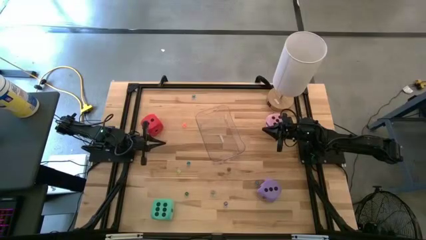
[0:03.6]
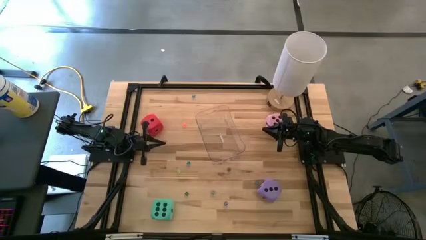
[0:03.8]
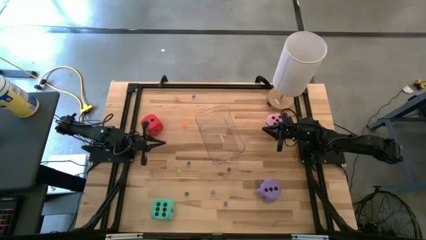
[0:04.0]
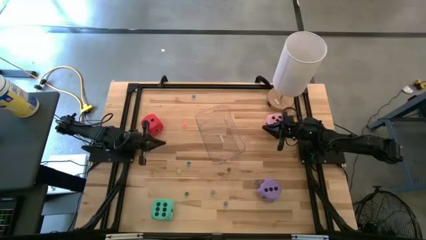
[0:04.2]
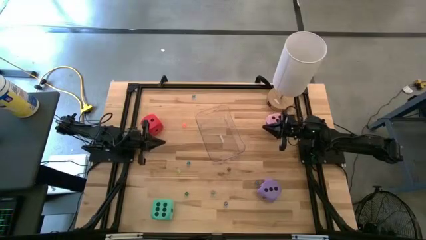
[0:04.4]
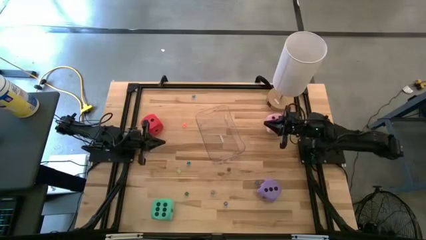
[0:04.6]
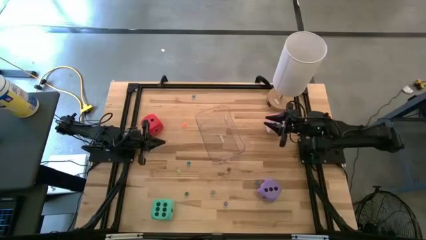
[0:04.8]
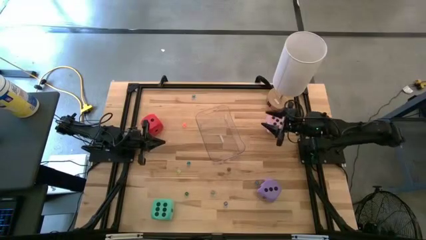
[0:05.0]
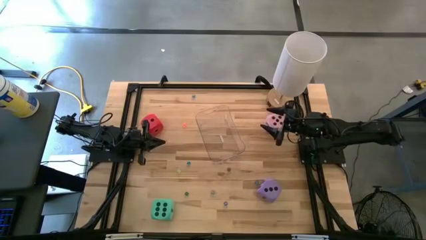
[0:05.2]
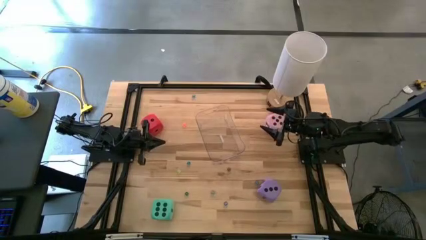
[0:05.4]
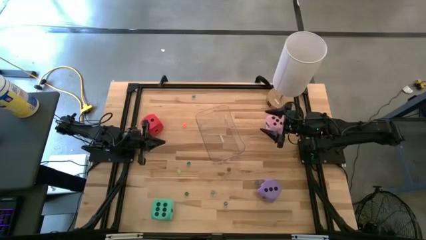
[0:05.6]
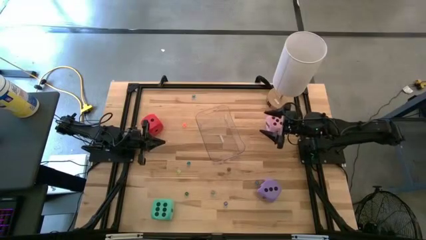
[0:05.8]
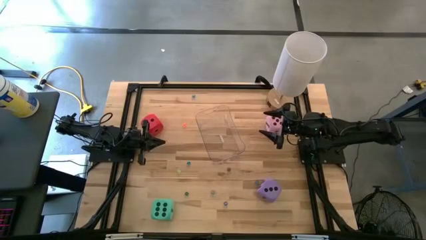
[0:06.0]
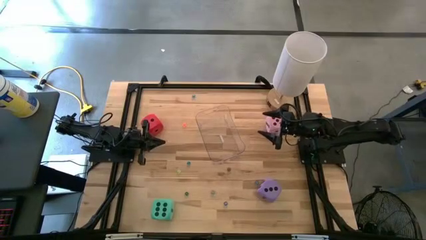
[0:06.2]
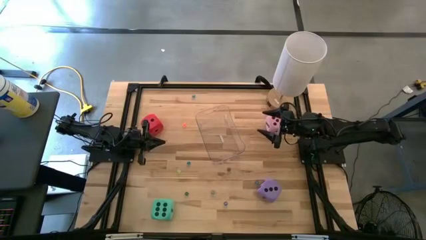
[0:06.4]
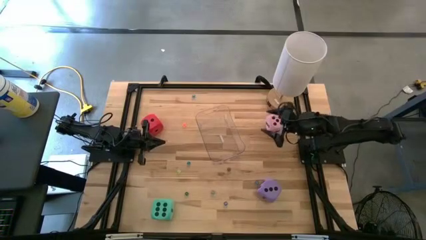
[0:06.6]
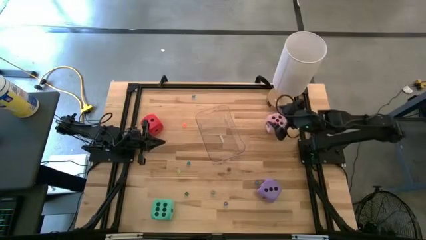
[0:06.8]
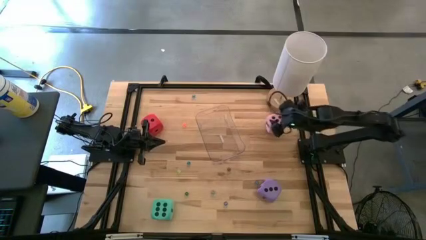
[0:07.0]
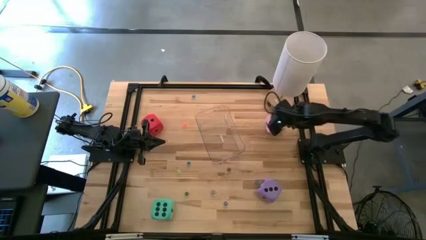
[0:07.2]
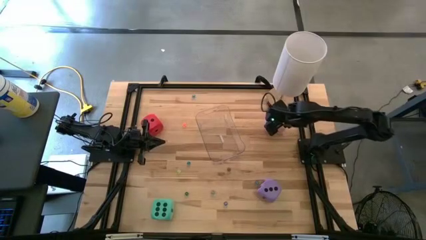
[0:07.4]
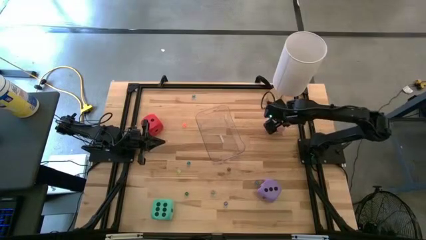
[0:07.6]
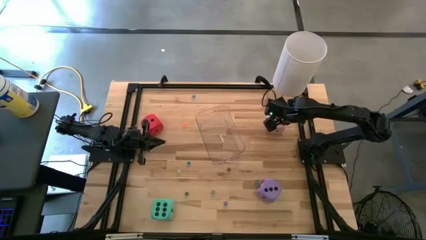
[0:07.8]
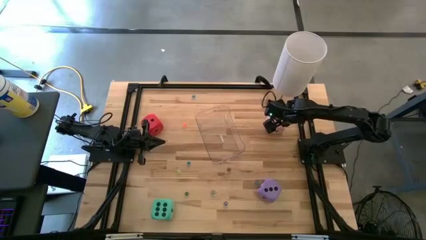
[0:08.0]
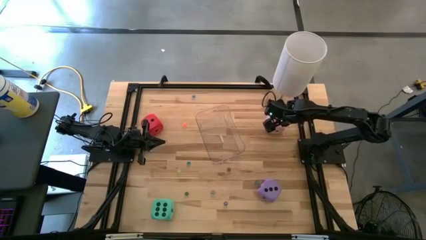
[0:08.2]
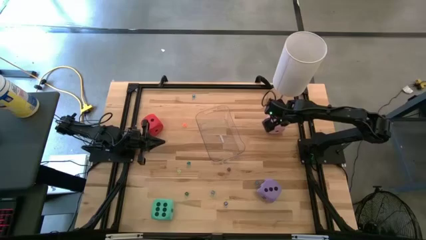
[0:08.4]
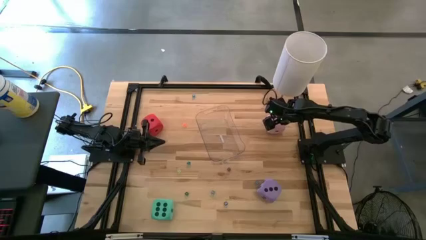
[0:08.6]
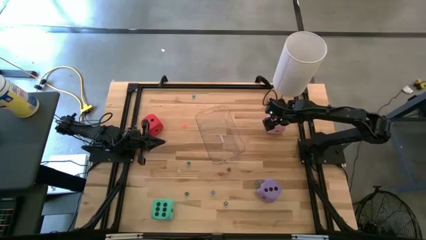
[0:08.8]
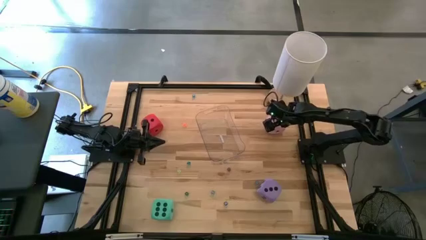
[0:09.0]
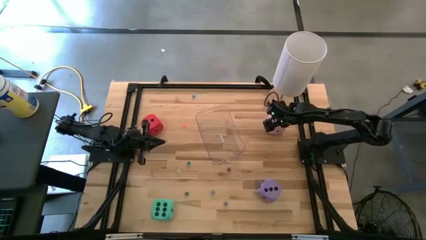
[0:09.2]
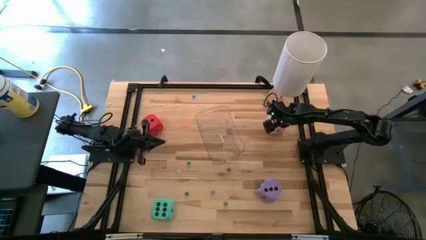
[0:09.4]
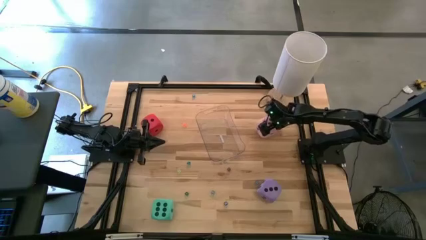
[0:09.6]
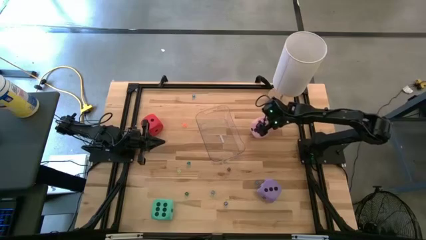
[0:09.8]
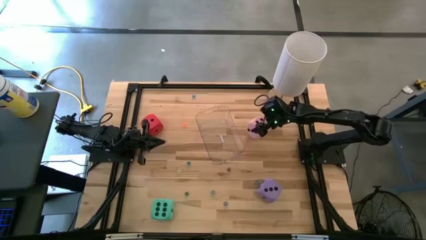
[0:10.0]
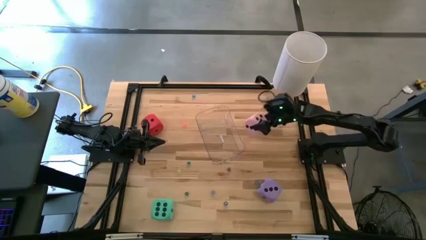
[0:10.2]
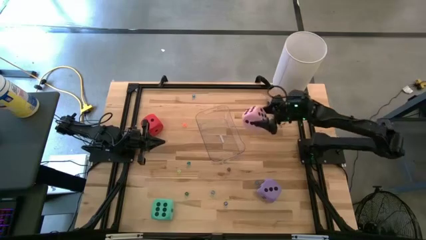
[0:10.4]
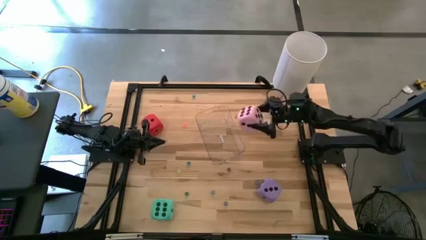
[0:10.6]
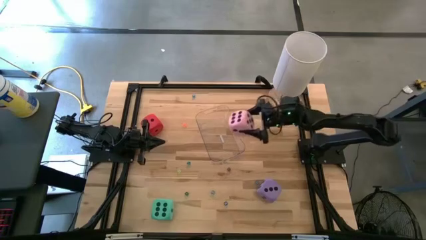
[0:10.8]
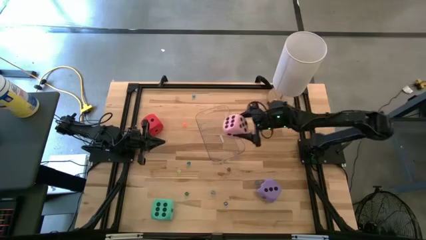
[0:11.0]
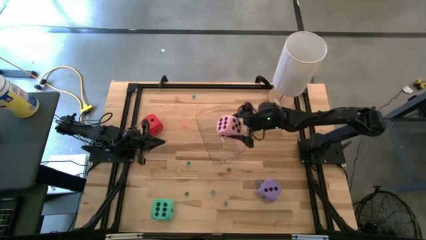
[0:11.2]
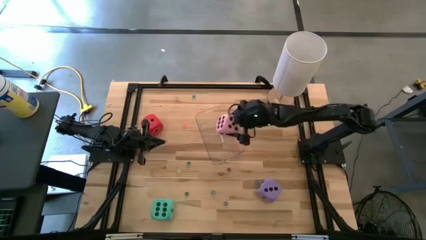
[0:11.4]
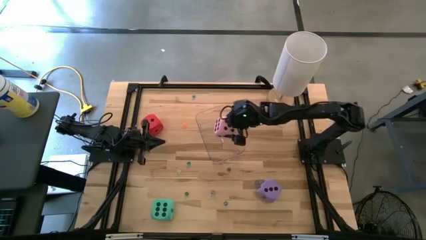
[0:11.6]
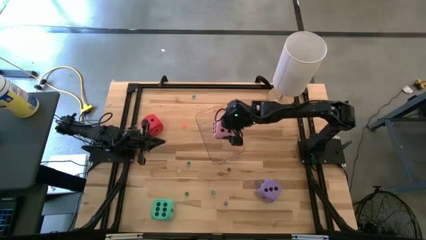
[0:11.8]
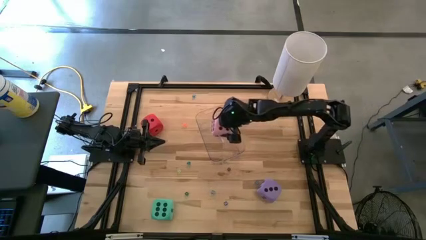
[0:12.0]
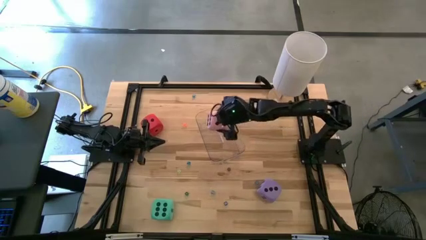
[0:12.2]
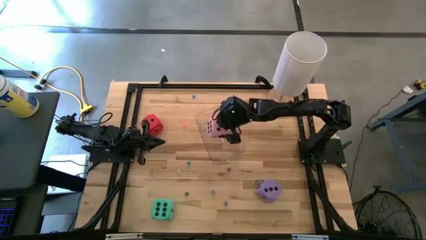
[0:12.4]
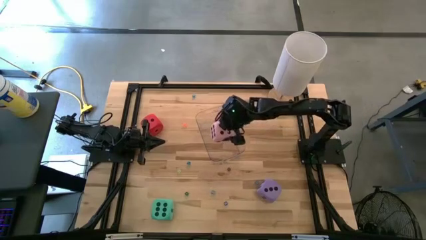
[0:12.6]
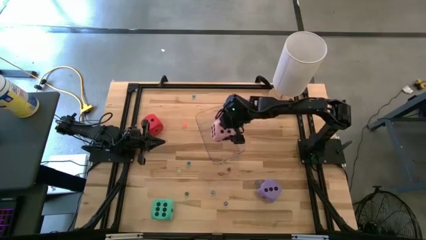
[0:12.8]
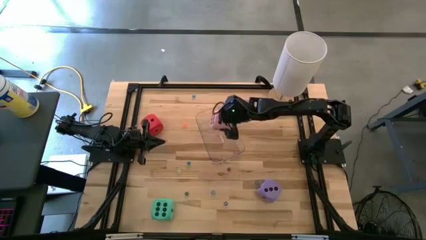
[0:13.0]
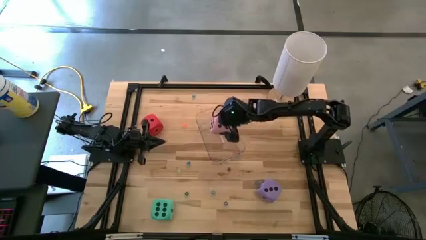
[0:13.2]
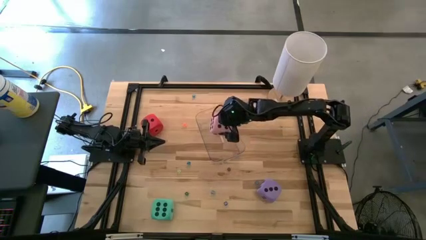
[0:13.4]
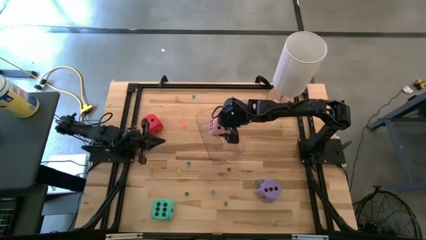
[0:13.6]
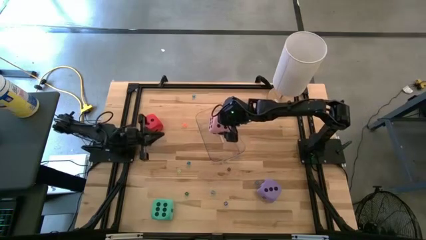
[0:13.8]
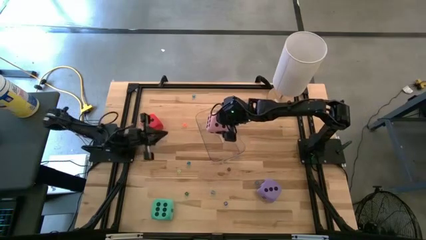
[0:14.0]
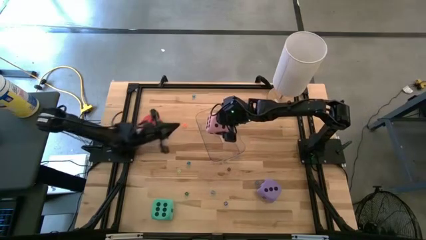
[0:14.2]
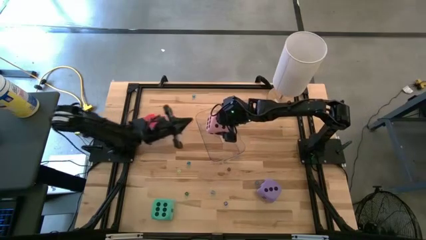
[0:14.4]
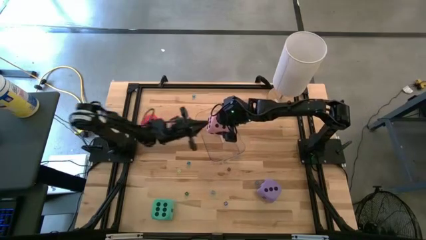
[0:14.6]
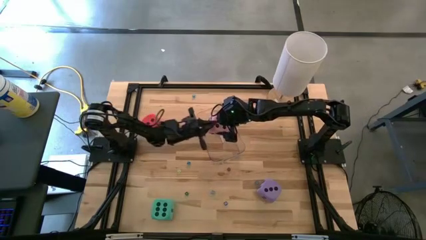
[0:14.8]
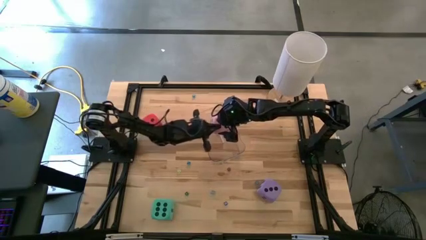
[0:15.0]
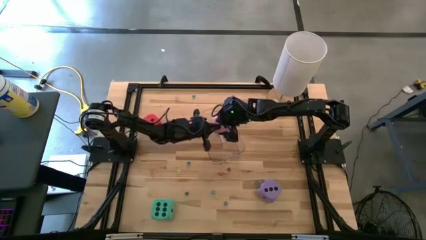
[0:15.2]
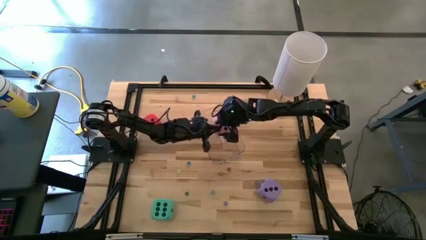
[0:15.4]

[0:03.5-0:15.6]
Task: Pick & Place Dice
Put the large pink dice into the transparent bin

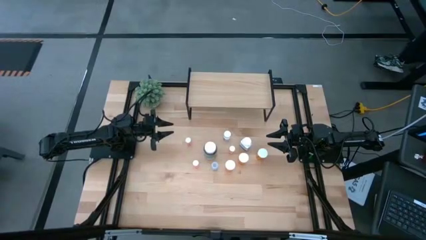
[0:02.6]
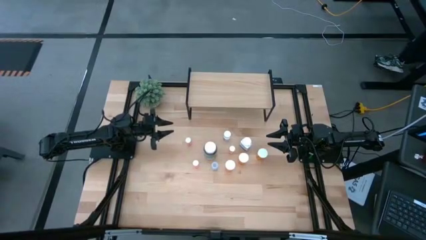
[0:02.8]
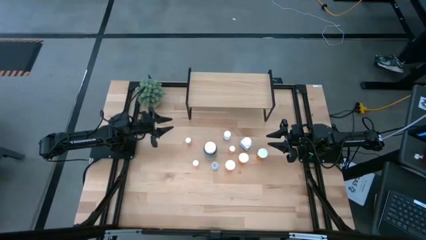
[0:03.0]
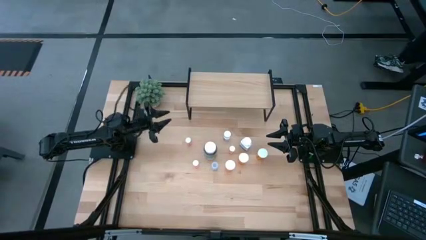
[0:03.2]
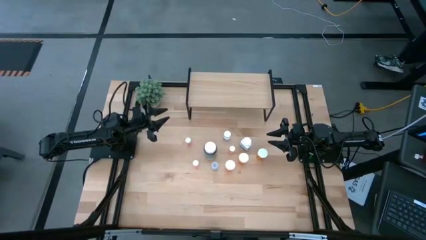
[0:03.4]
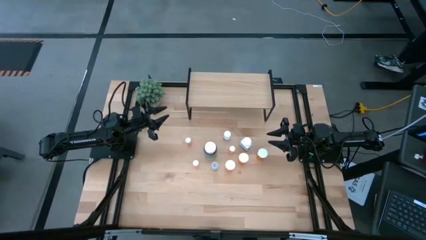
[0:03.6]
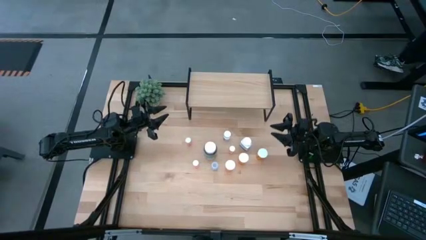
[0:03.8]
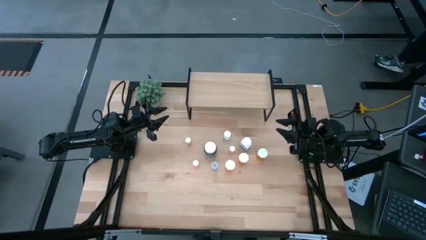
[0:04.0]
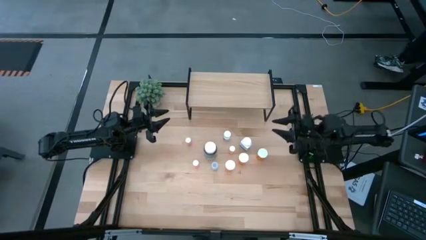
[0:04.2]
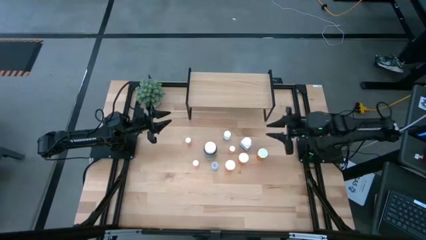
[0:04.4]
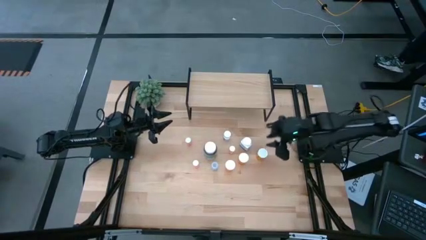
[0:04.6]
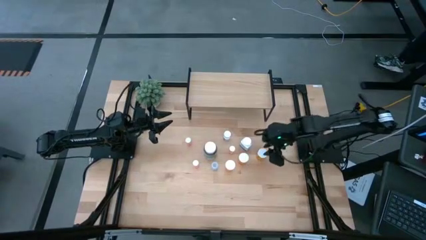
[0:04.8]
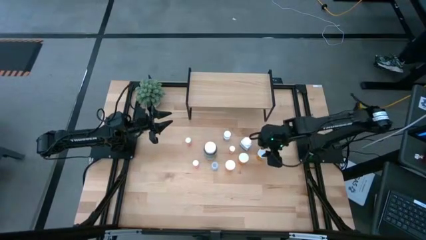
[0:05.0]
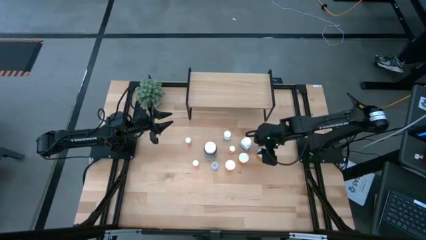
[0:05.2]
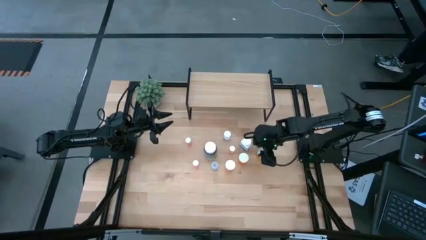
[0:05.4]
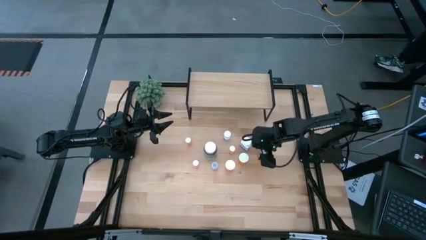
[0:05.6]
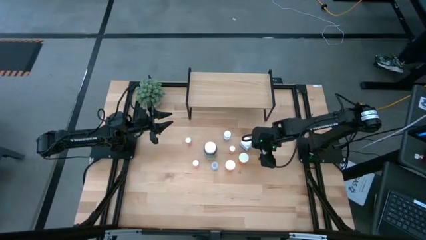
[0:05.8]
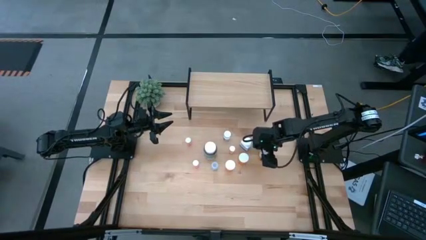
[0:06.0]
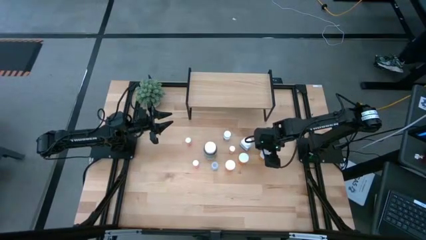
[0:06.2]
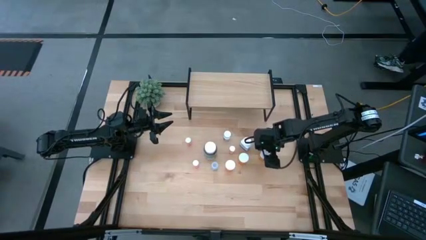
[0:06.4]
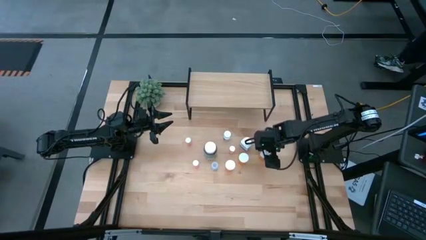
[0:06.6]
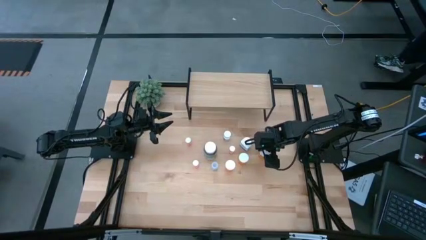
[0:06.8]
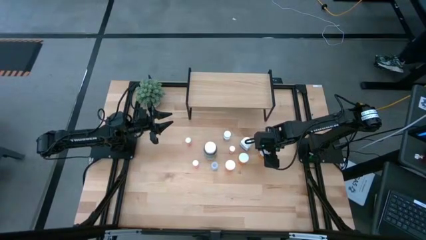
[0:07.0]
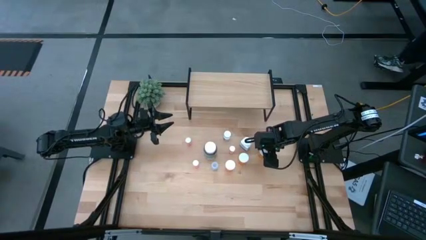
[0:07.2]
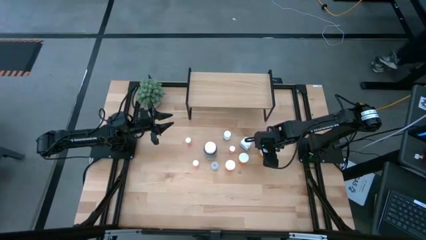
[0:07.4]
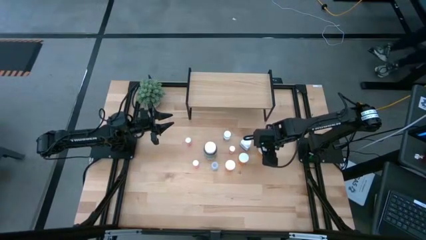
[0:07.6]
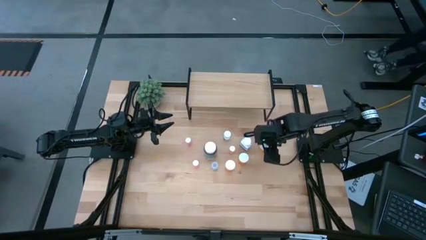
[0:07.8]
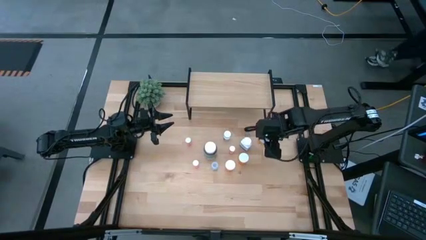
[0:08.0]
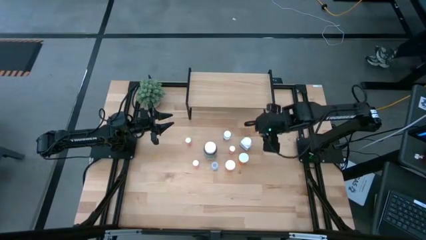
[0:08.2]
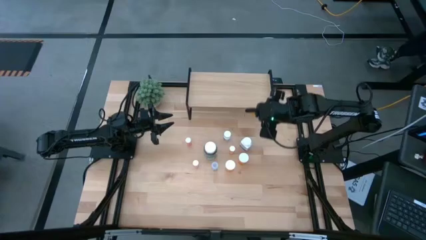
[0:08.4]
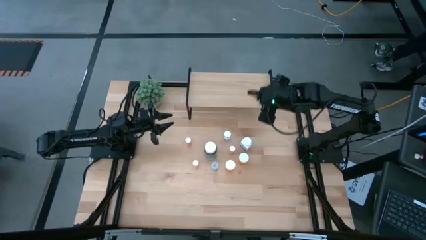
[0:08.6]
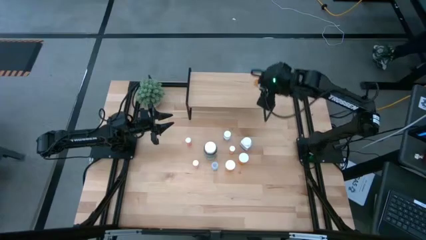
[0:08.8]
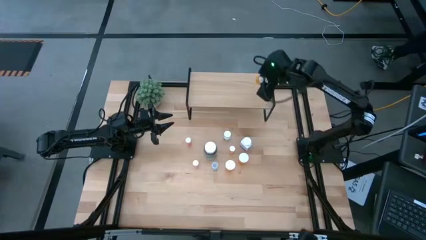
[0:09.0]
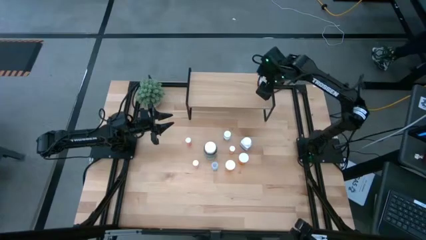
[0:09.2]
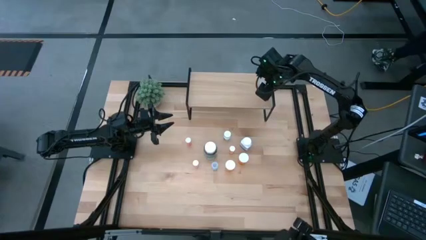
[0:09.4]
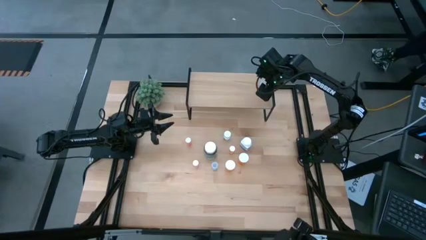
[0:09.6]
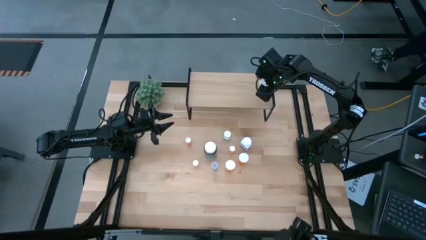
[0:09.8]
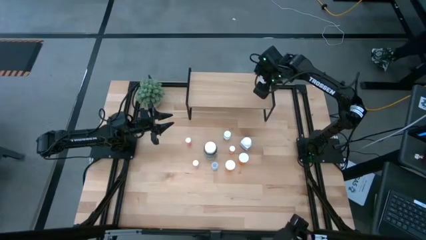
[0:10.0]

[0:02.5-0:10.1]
Task: Pick and place medicine bottles onto shelf by color
Put the top right orange pill bottle on the shelf
